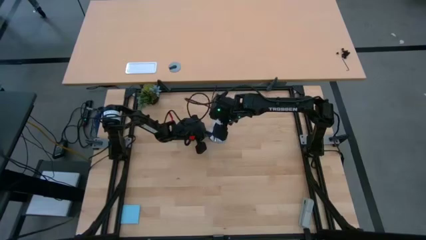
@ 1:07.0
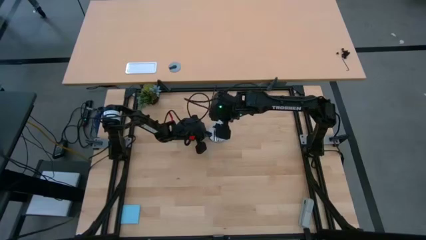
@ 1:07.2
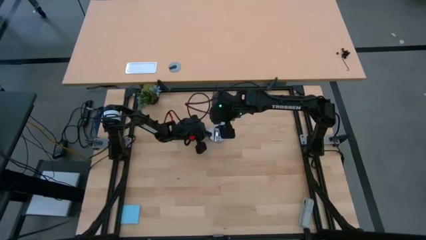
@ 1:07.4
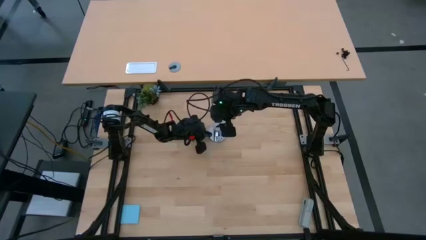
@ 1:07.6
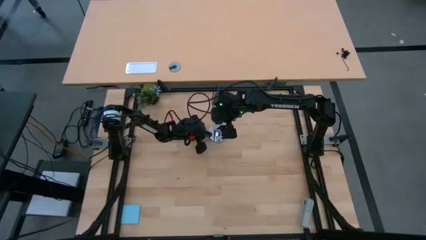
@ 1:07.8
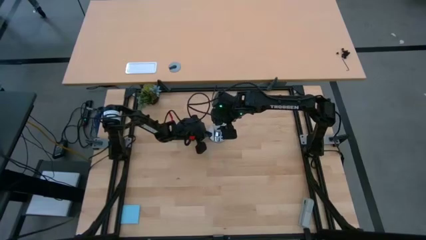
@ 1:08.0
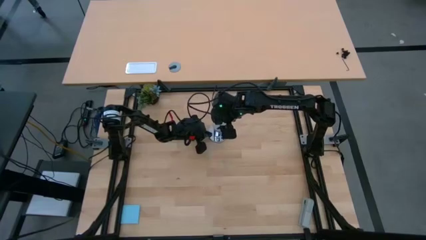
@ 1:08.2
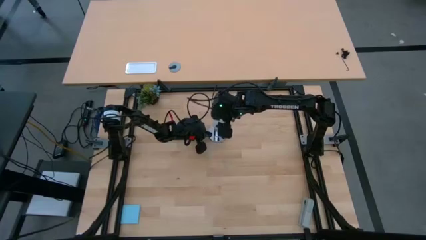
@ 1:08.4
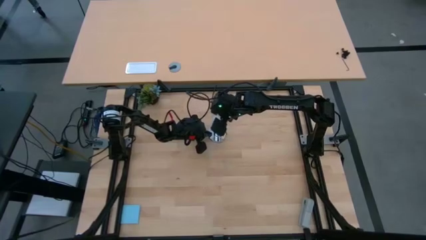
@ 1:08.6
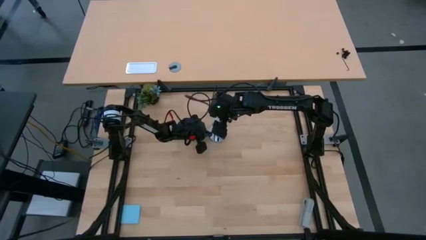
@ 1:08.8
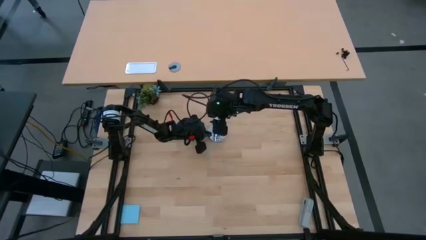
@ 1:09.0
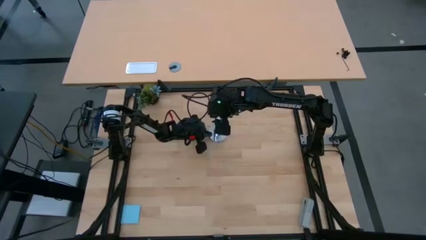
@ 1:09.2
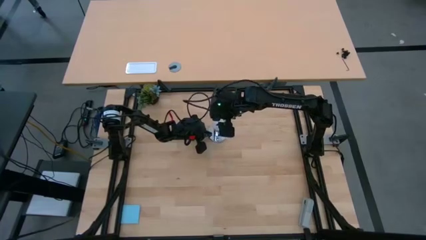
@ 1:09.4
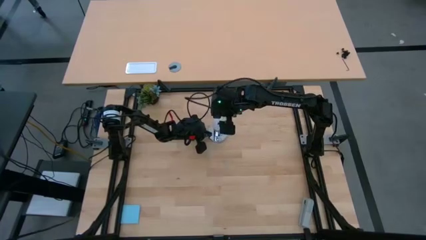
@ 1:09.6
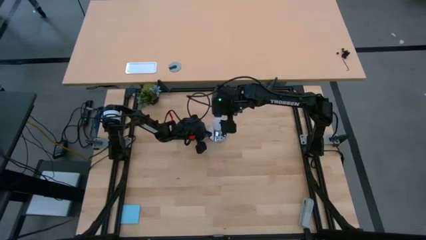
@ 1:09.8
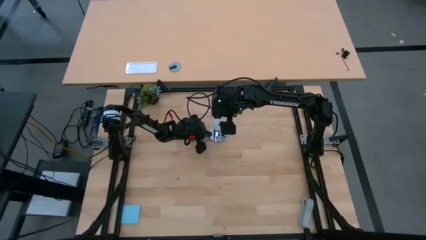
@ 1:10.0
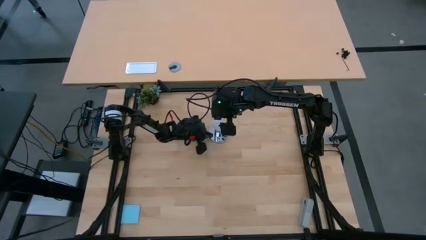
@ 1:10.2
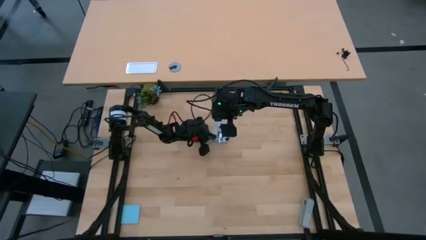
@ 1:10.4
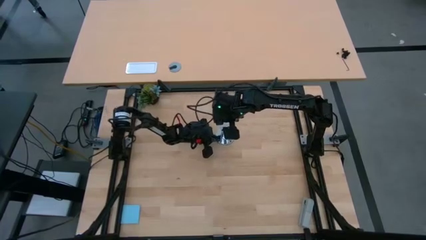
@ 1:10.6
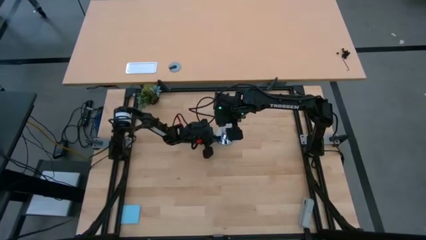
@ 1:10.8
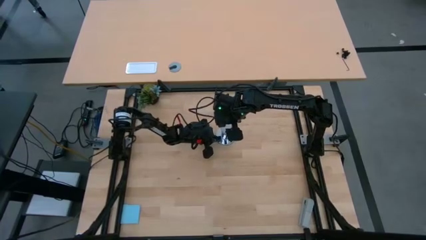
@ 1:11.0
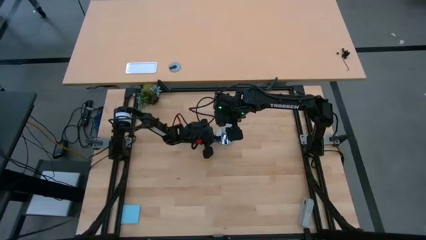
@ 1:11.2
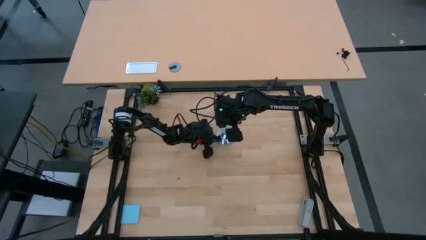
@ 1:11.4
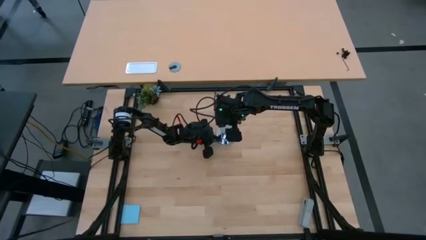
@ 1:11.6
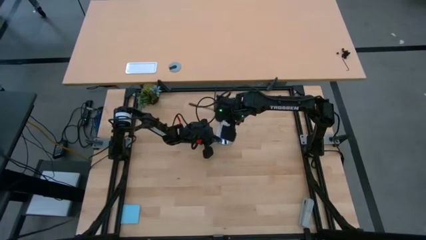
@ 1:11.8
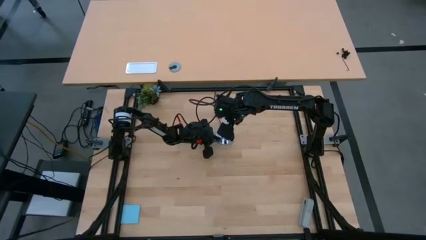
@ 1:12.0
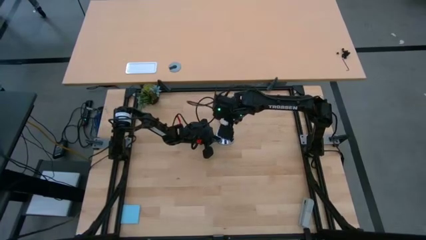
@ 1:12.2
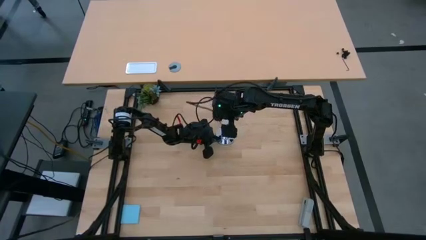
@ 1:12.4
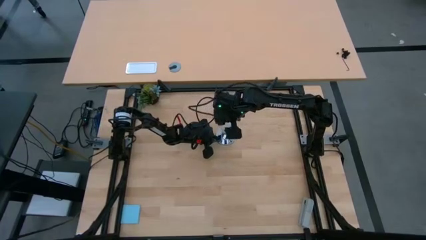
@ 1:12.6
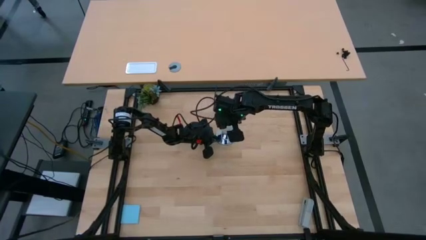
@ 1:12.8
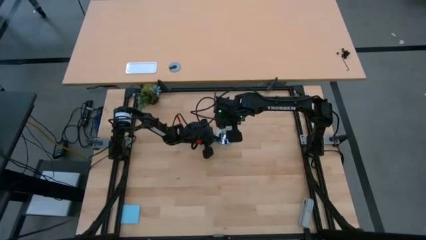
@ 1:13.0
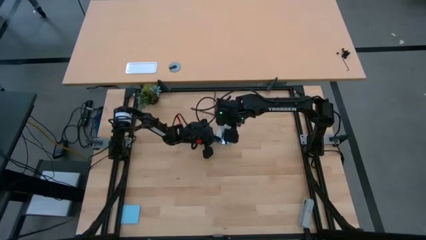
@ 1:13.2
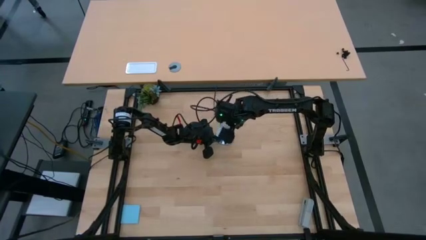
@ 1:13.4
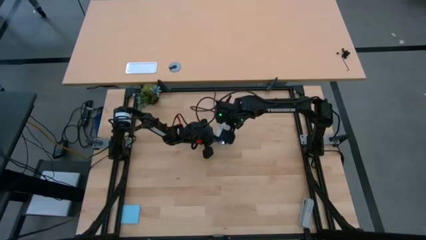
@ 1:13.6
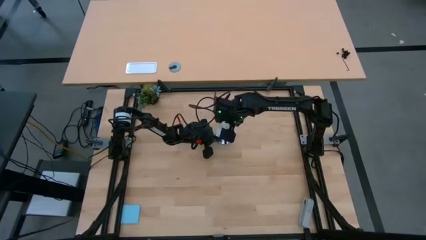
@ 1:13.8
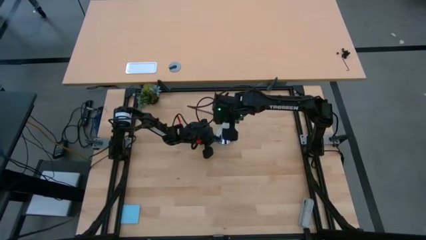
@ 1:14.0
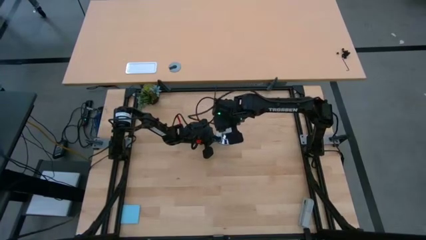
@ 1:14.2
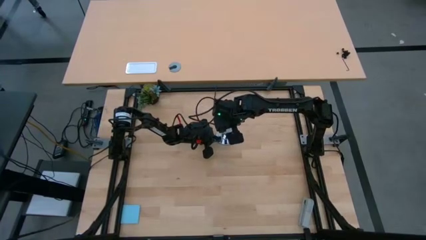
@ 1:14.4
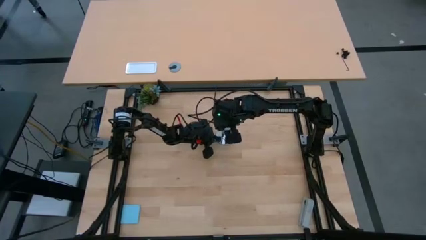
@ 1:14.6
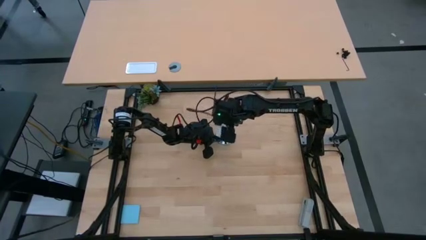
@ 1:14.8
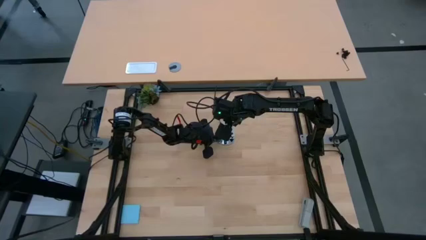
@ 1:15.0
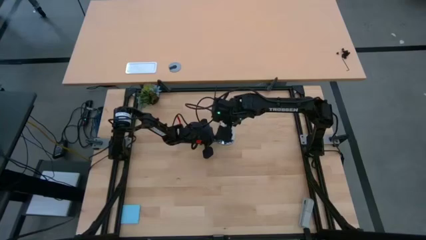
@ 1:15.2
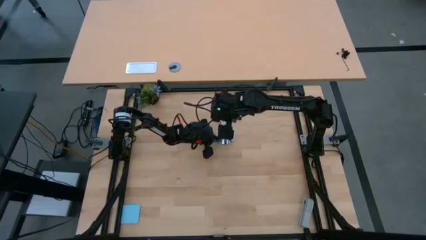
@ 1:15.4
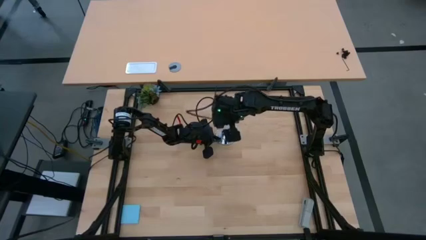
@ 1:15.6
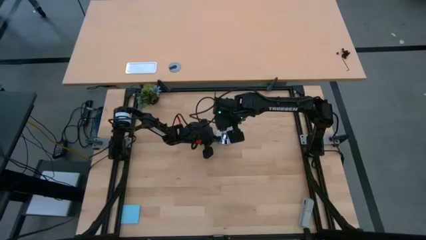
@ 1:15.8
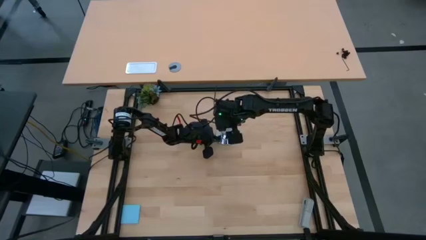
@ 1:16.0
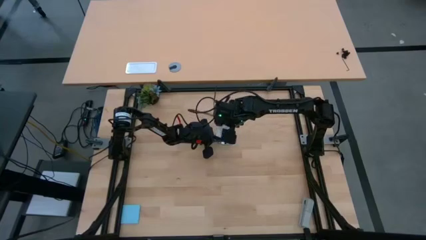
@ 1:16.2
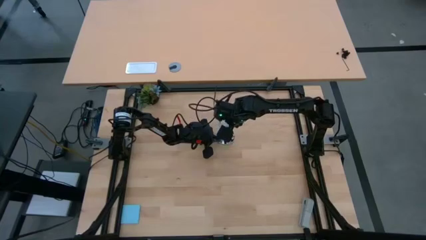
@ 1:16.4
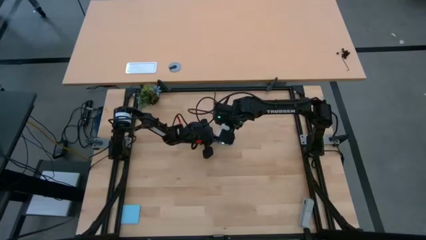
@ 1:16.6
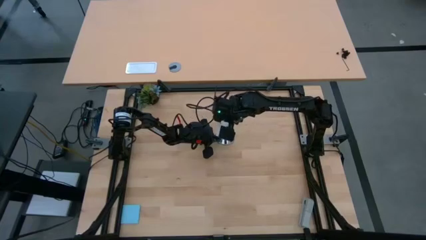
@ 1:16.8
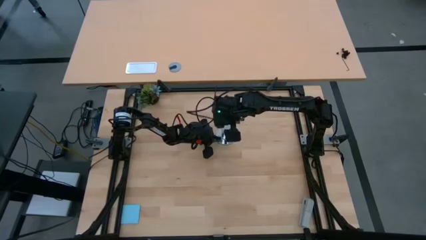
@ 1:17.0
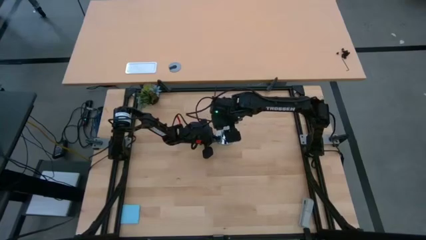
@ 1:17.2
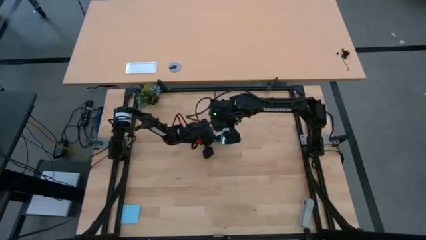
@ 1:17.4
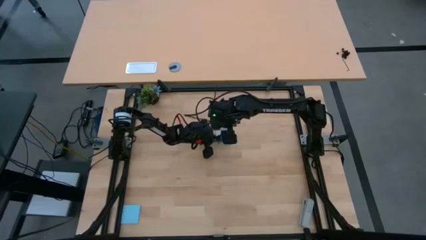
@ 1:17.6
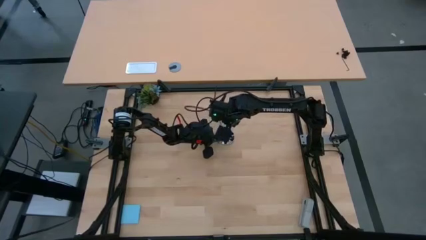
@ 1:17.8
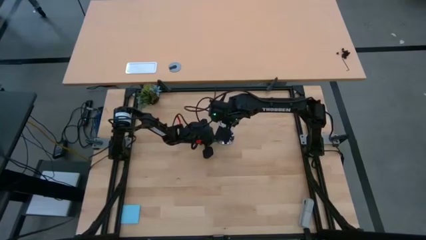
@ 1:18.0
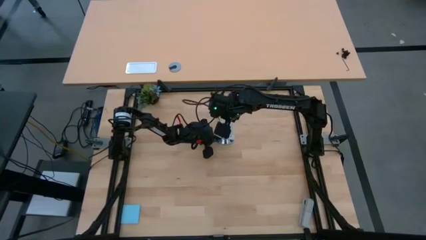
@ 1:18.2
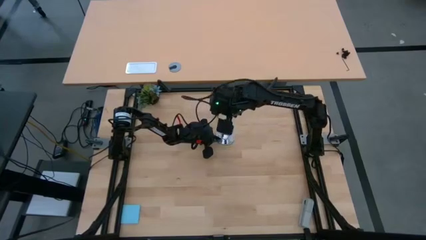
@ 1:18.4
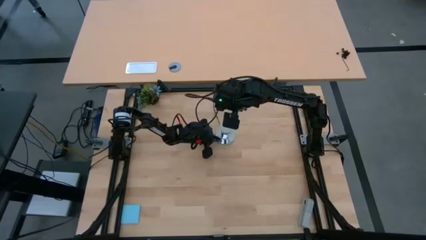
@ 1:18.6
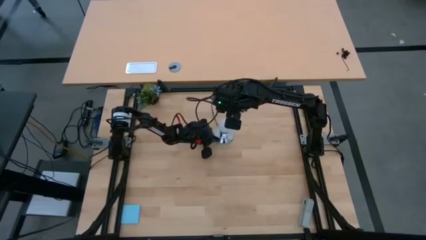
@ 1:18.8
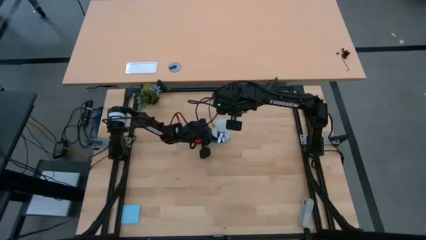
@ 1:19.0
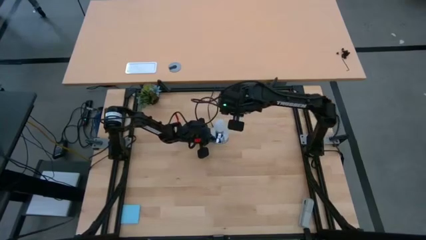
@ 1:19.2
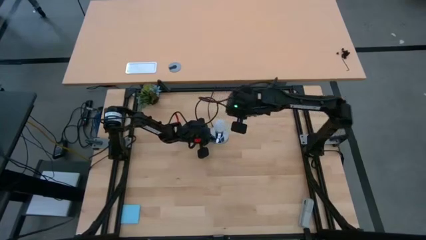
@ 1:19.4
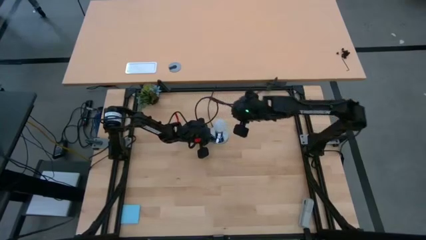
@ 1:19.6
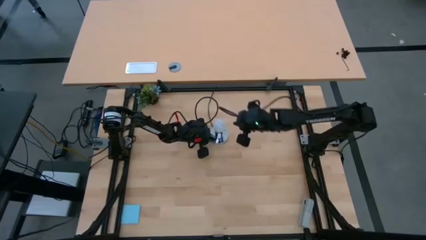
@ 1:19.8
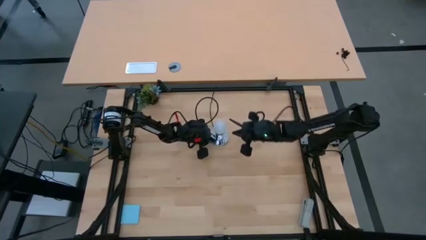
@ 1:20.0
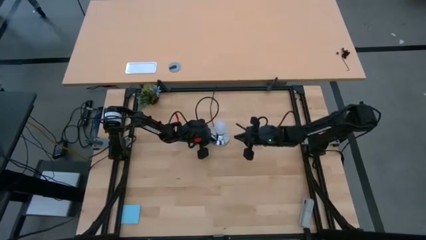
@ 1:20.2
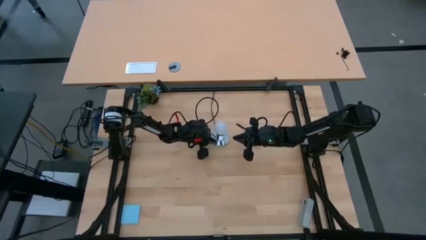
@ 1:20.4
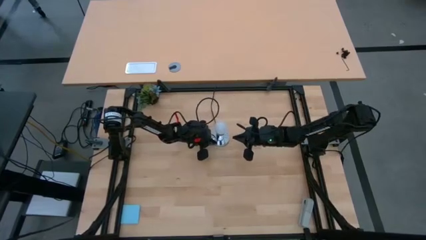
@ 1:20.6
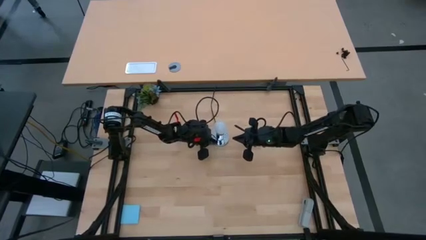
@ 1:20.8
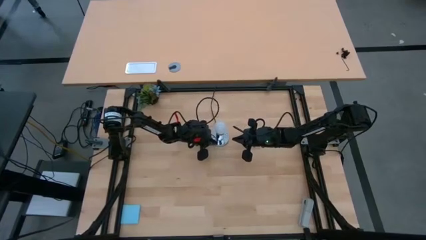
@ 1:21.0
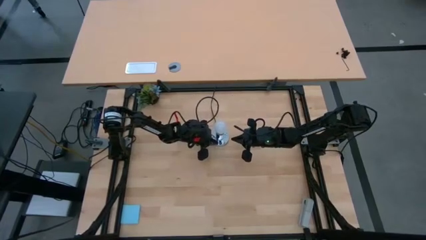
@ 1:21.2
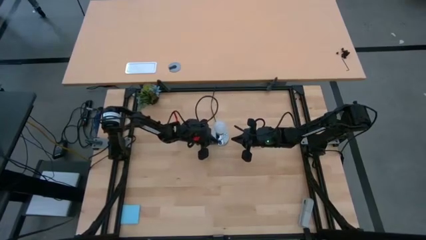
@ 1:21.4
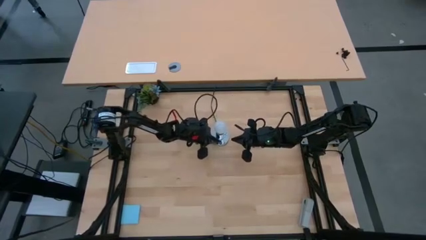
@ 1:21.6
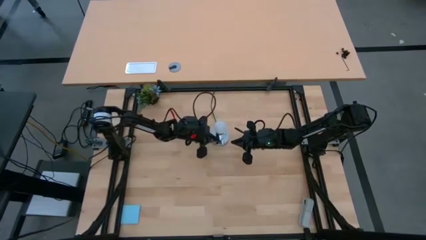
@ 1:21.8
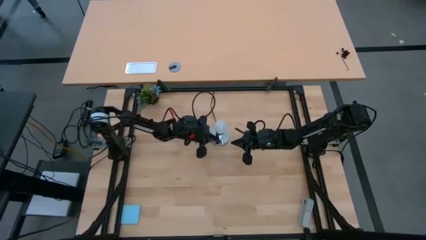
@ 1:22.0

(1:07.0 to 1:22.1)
Task: Screw lightbulb
Insert the white lightbulb into the silver lamp
